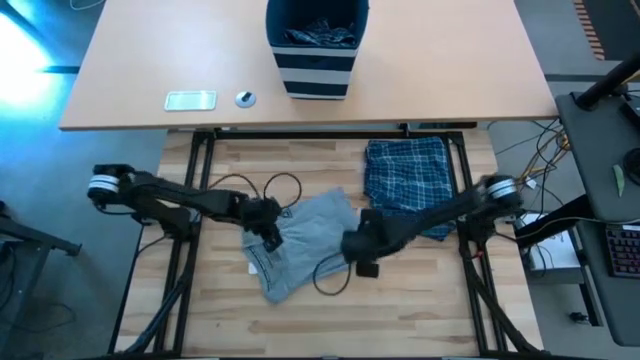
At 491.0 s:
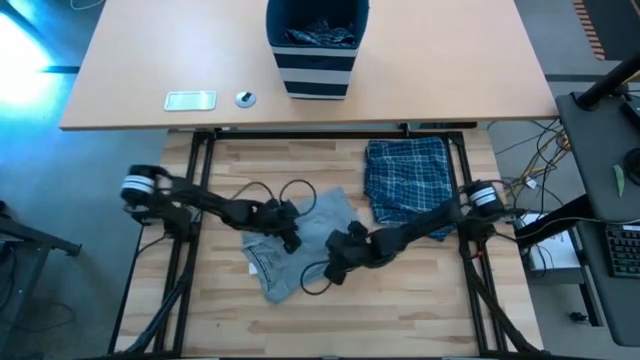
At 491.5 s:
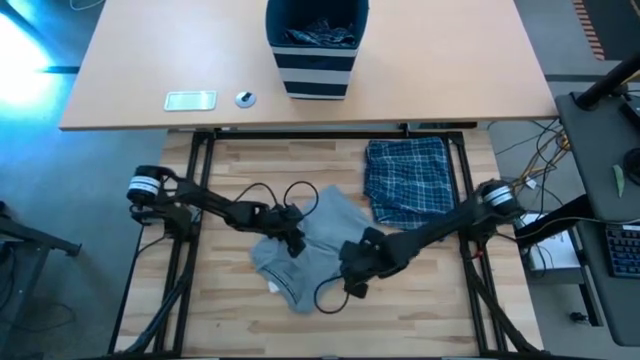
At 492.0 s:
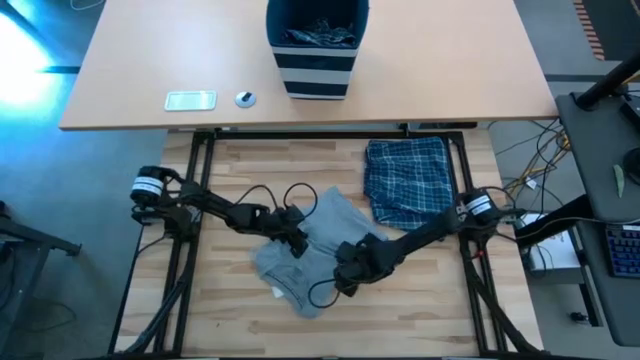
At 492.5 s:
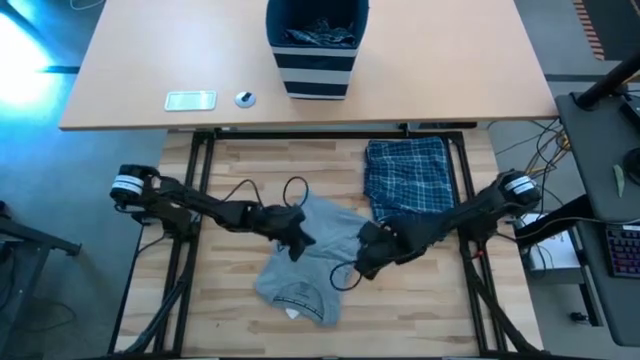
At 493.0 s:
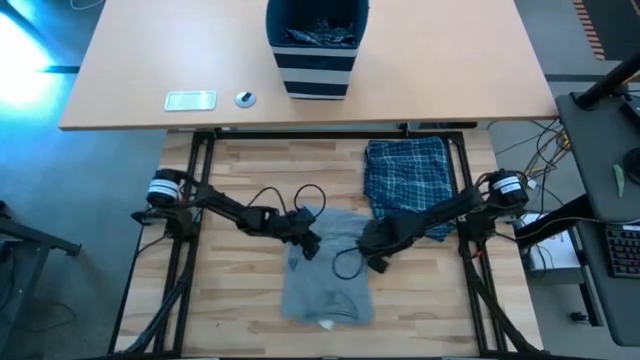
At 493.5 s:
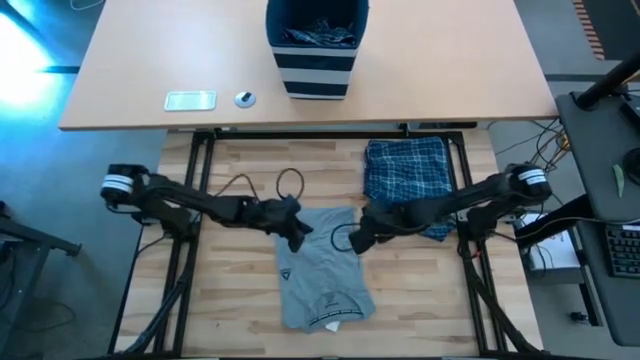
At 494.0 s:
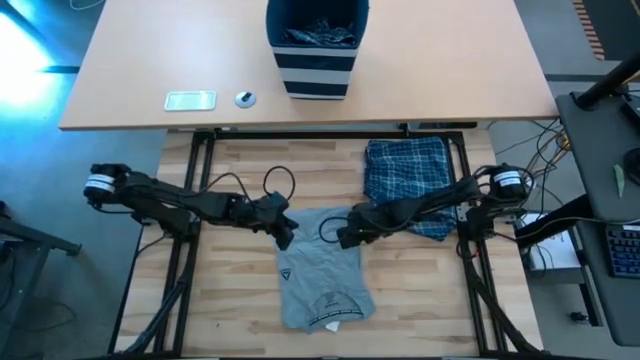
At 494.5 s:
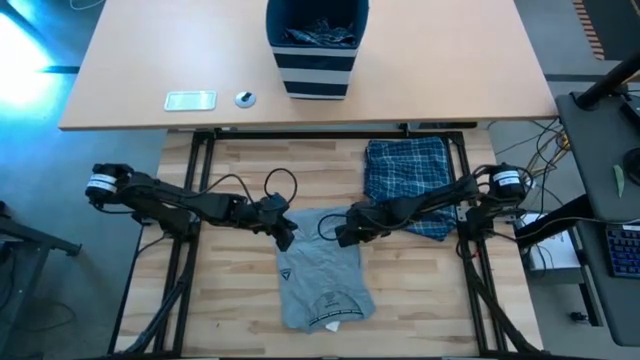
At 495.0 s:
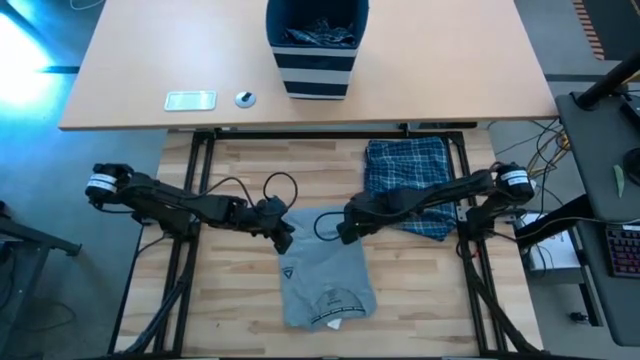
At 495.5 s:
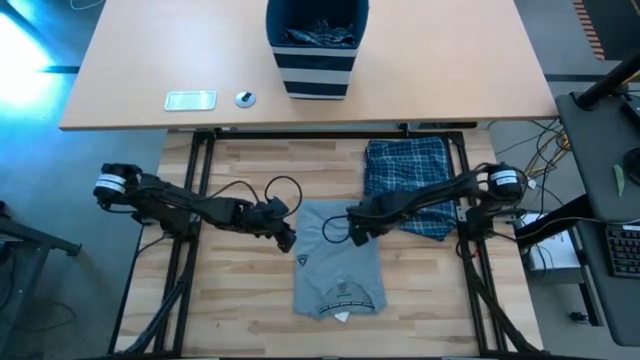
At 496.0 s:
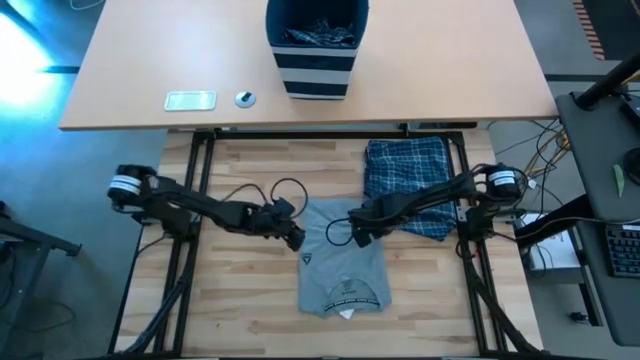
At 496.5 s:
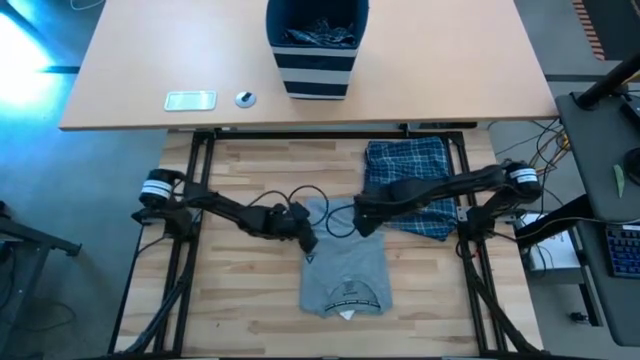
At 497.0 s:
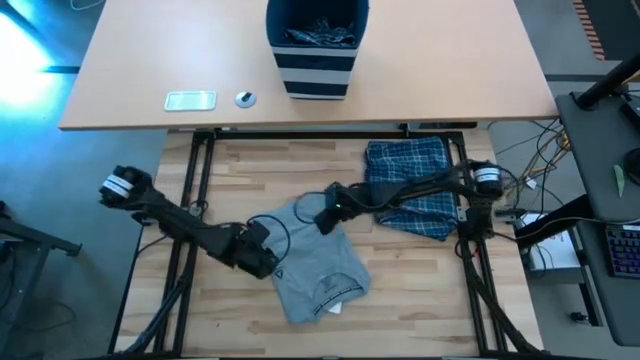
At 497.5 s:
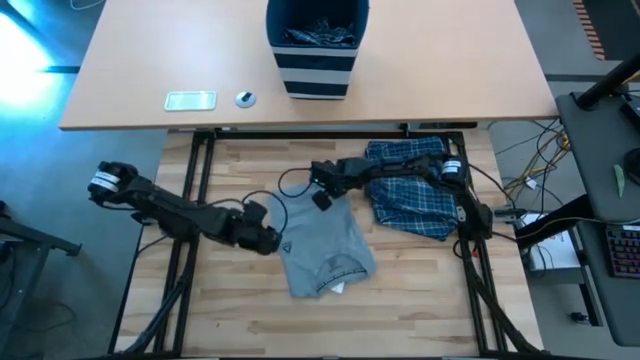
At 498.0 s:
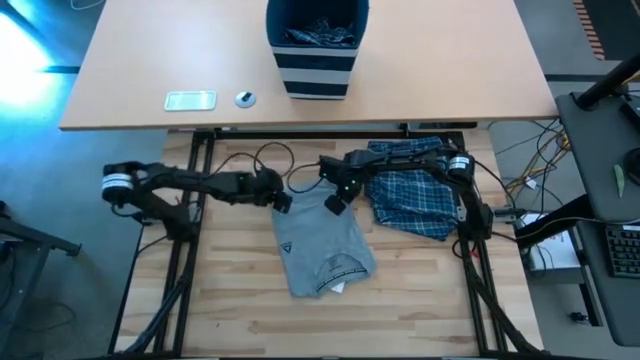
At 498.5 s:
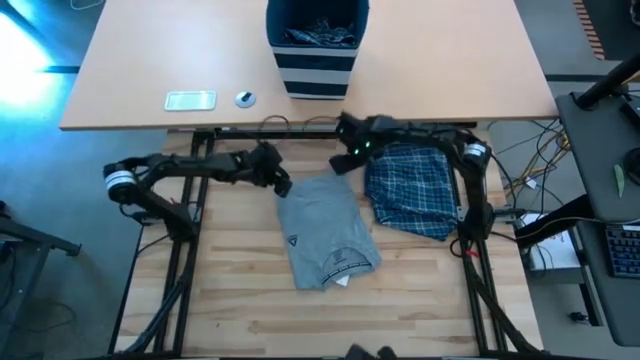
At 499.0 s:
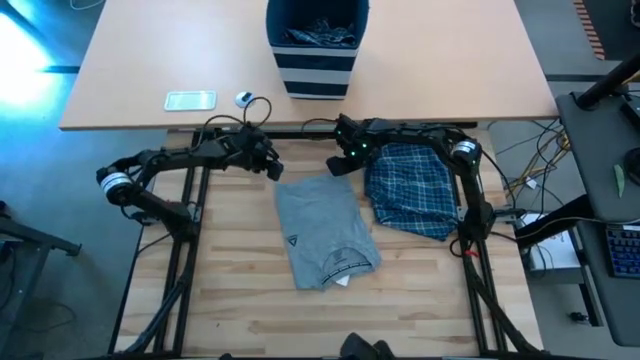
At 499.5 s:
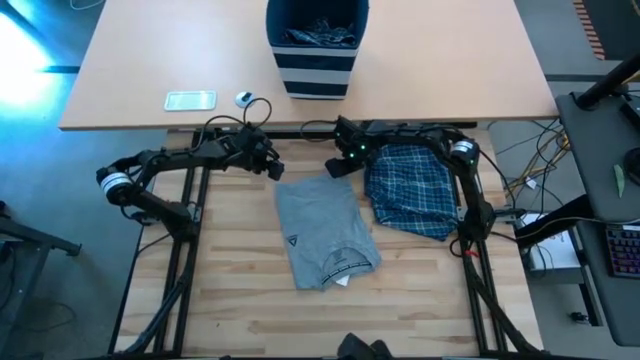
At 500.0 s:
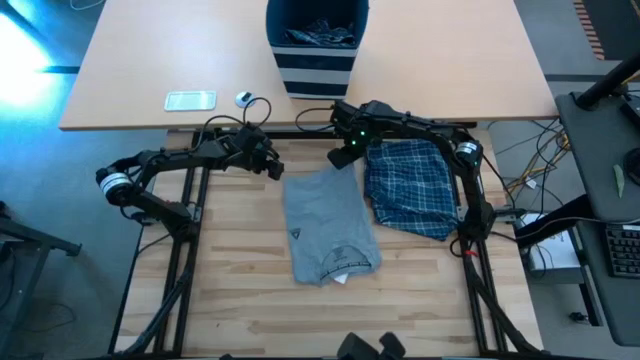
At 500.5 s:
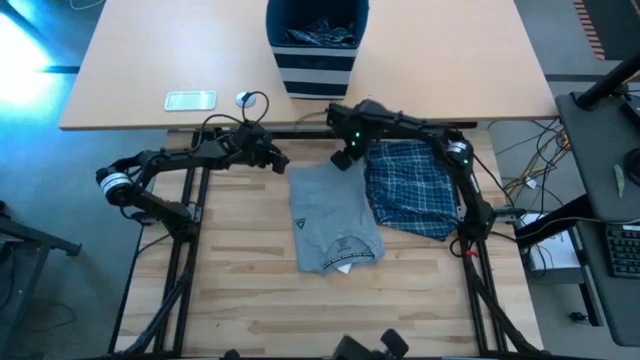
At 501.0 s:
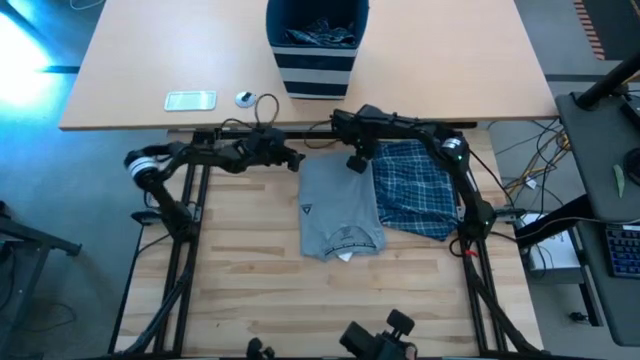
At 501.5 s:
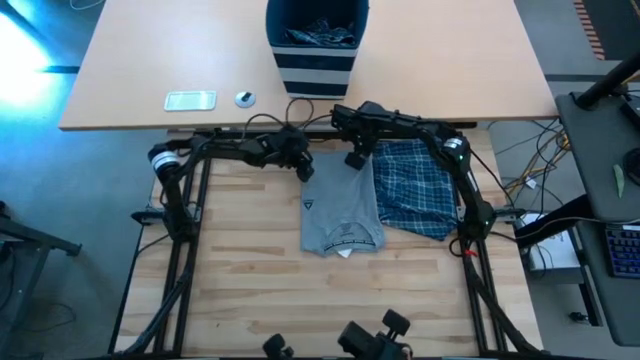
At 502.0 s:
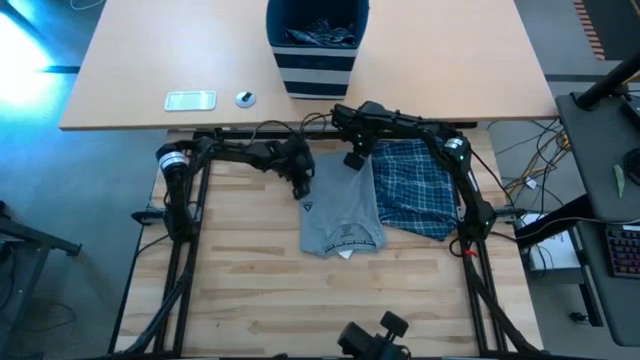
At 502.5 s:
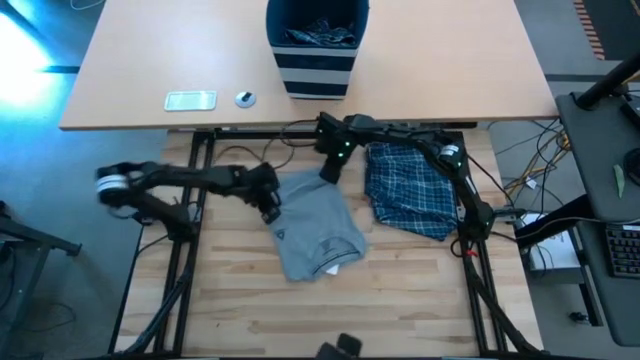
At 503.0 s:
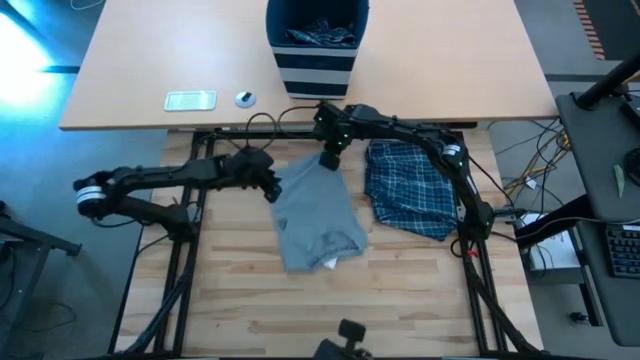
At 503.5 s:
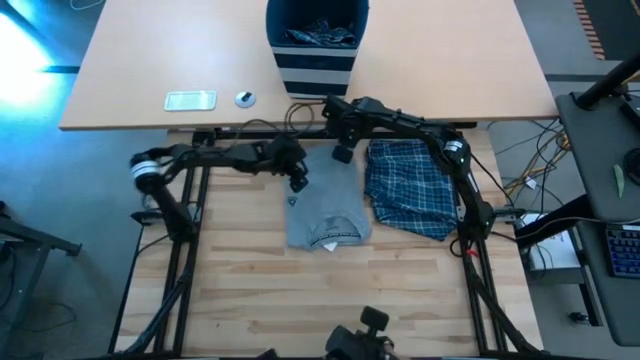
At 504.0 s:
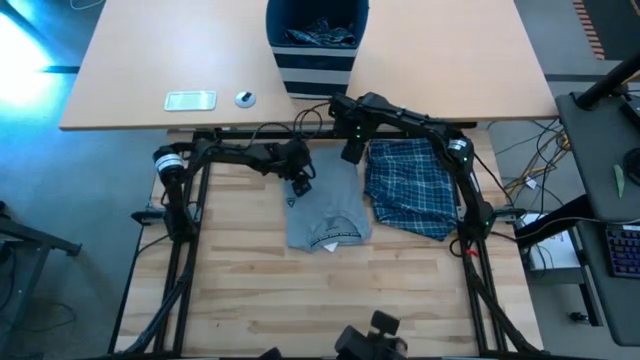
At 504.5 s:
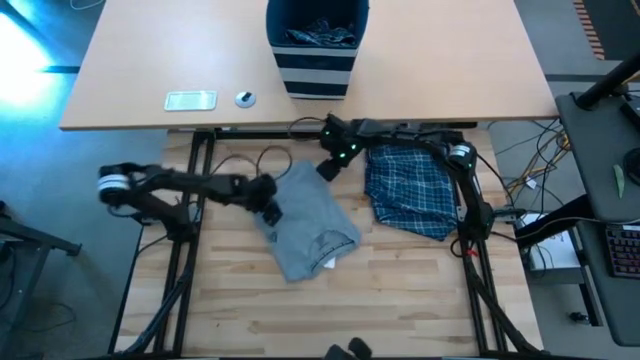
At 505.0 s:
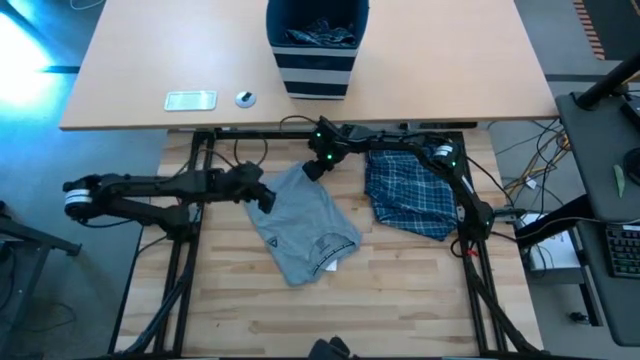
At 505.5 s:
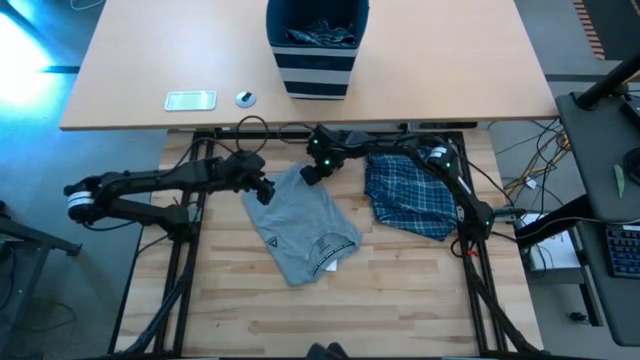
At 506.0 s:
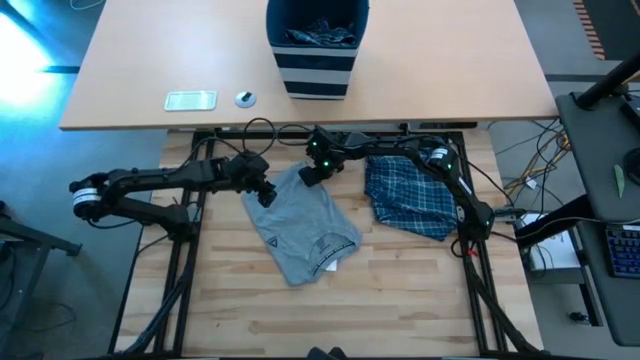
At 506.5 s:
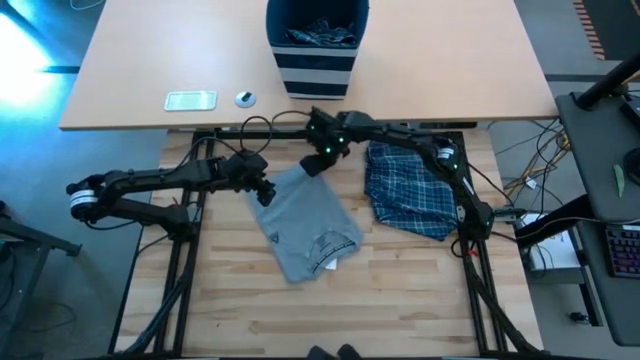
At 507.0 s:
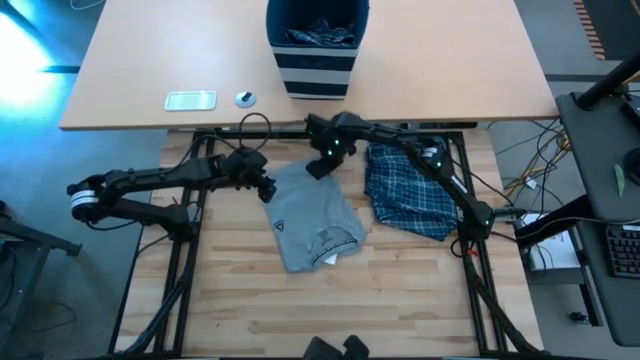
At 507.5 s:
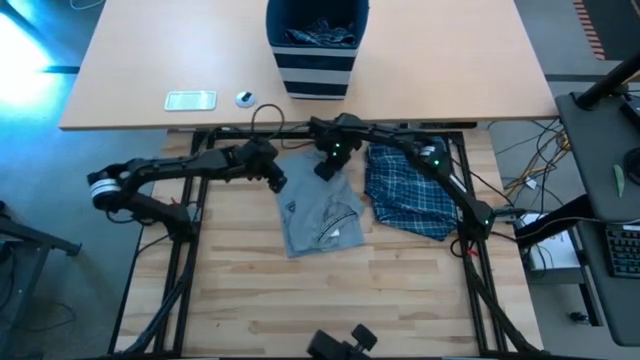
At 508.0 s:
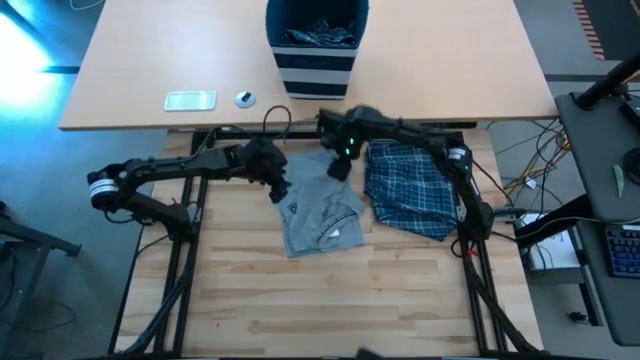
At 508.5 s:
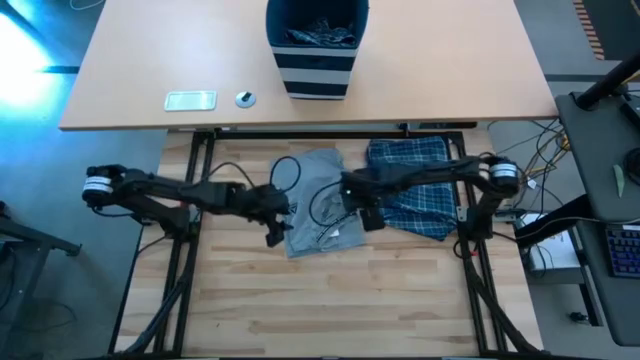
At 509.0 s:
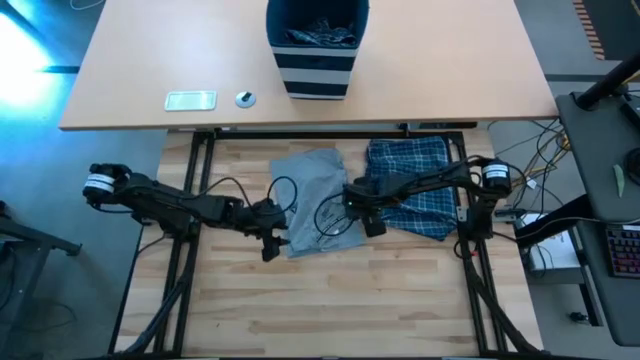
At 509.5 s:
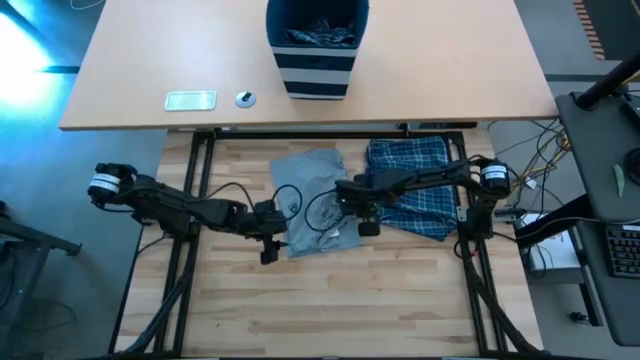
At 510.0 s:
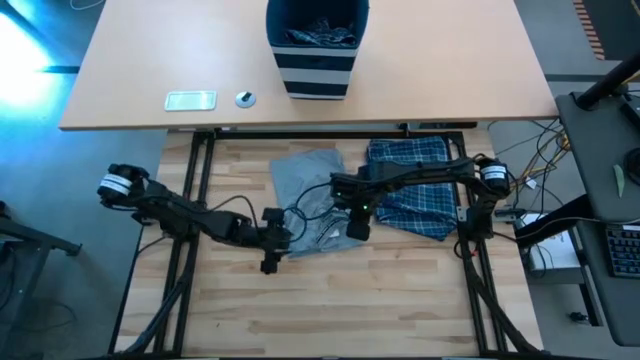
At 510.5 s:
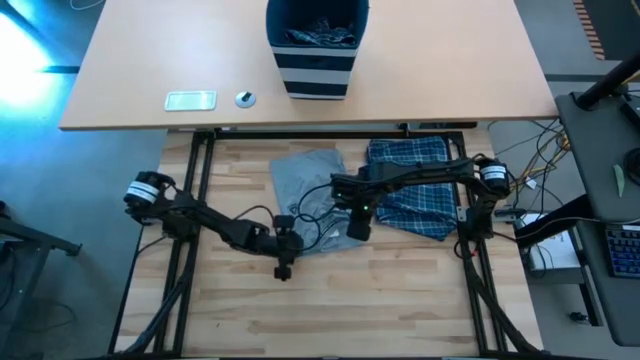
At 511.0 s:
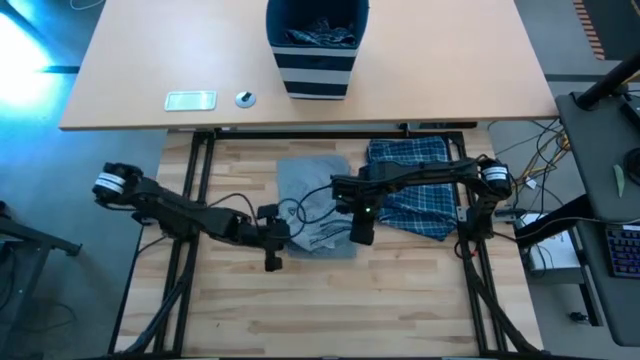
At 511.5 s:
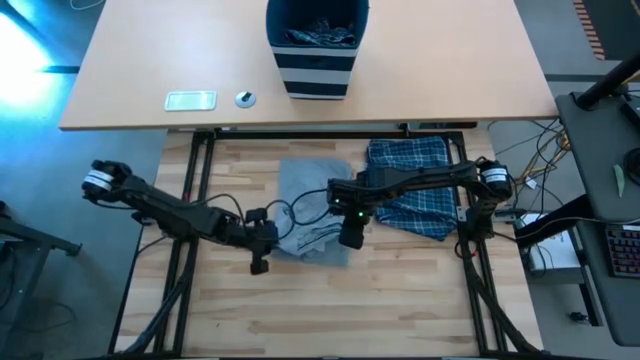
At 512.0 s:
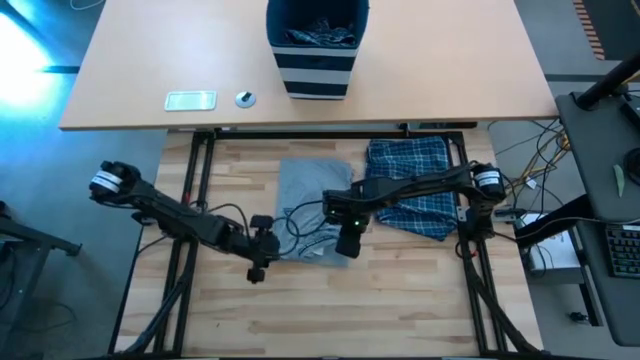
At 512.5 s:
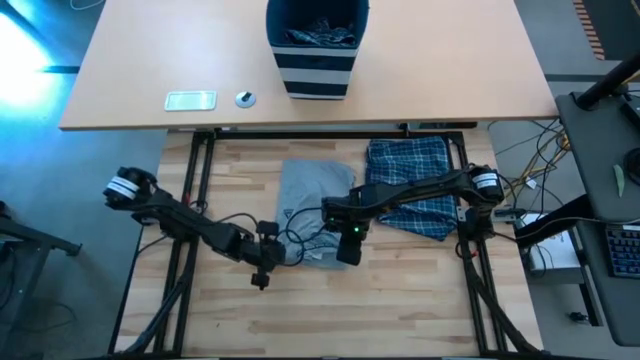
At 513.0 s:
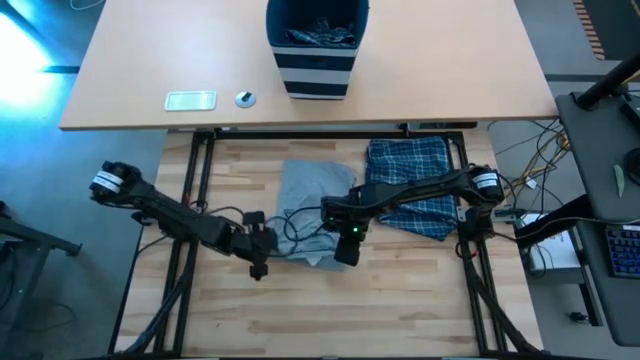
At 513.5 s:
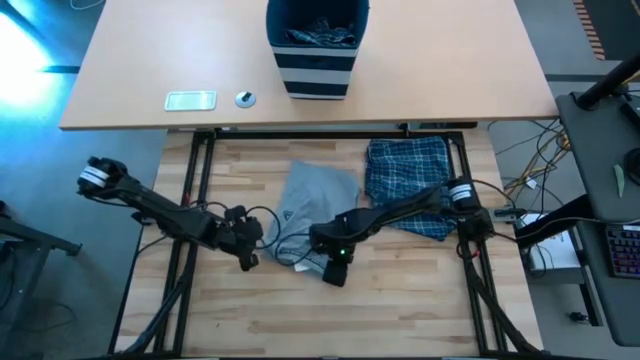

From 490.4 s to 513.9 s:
Task: Fold Laundry from Bin
Fold the gray shirt
